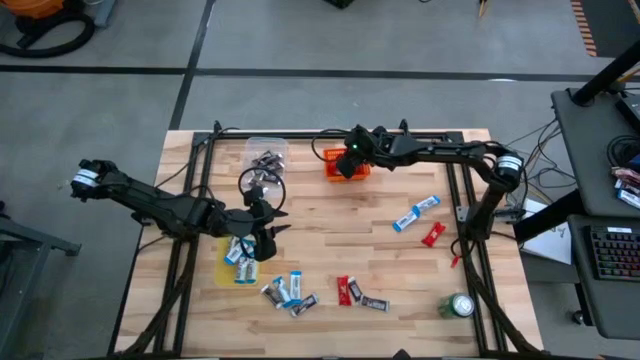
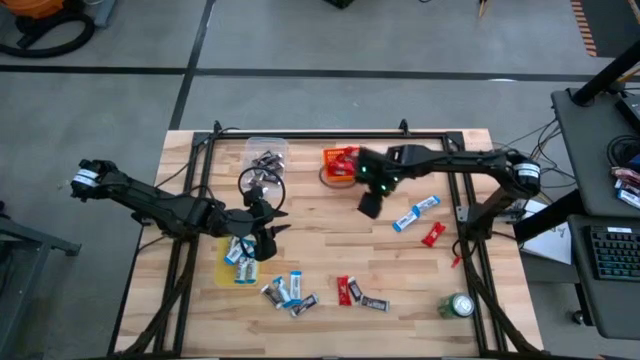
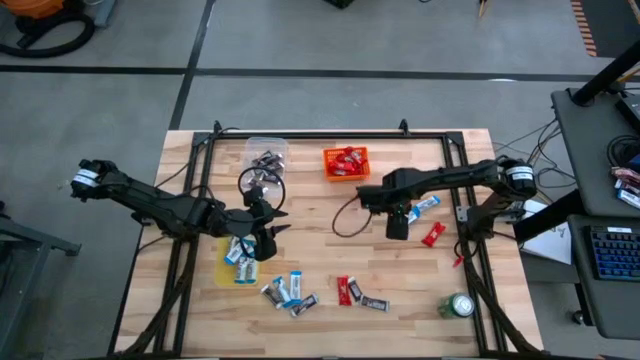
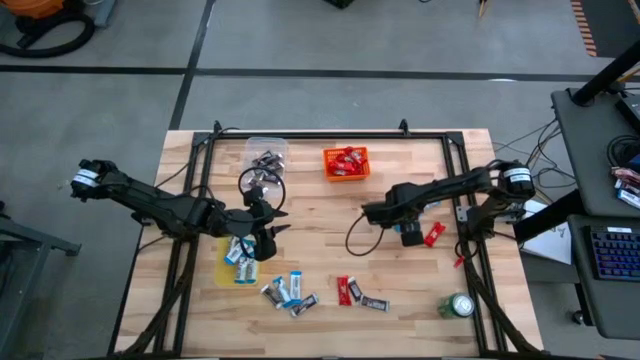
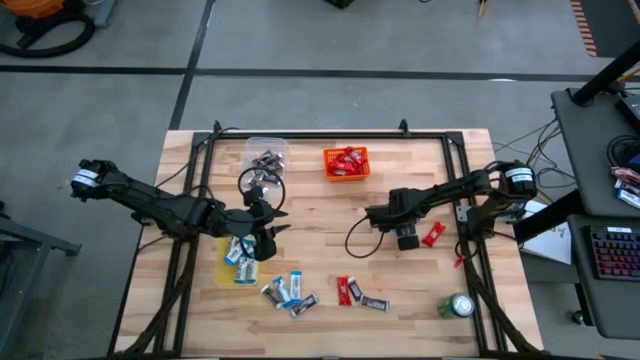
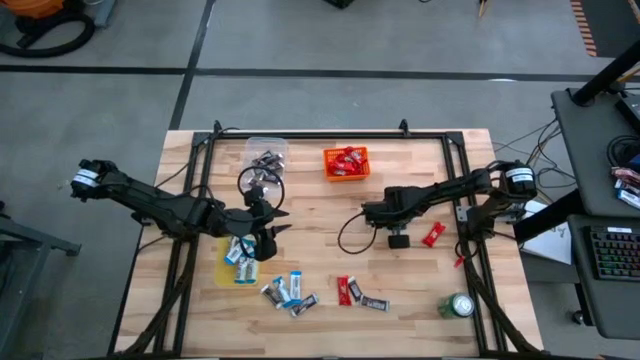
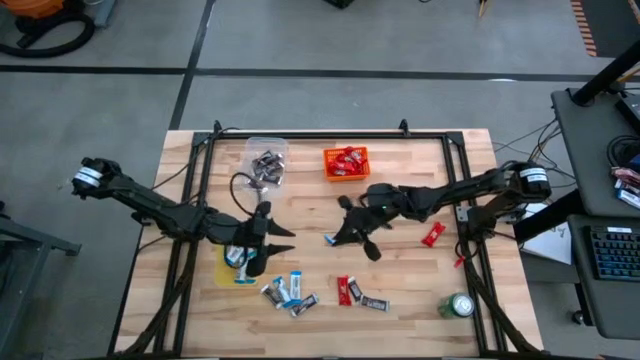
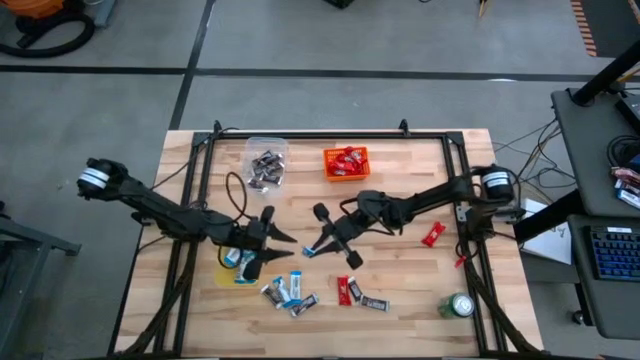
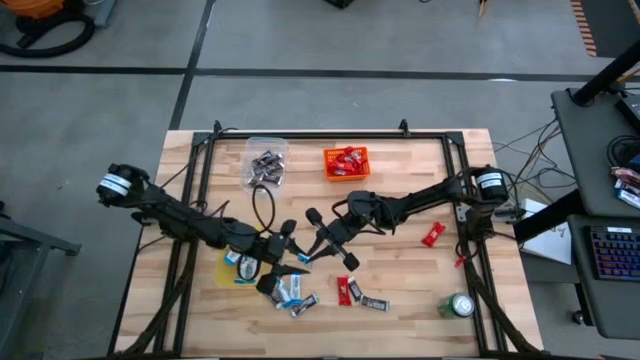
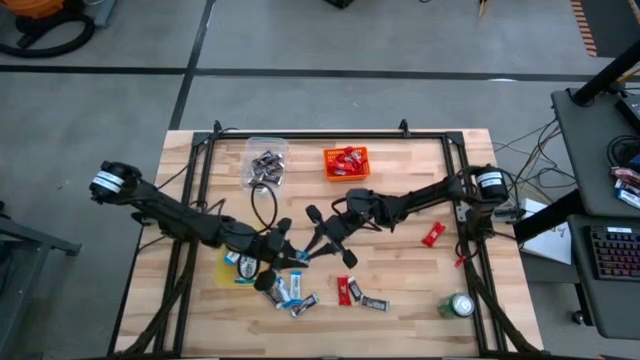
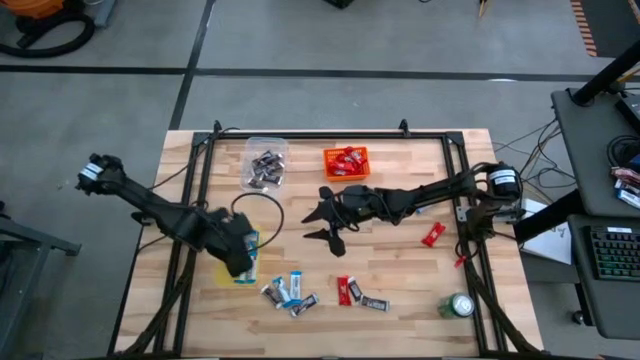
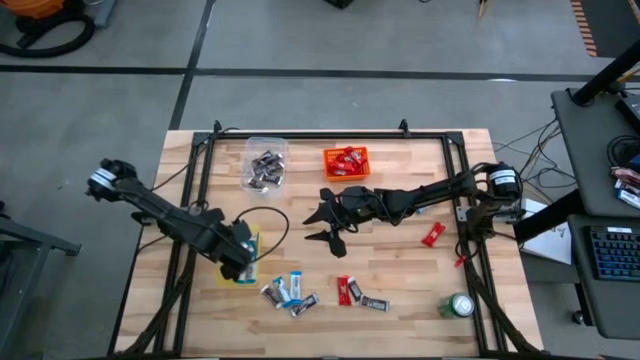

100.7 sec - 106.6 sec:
Task: Sort candy
Put the middle right white candy into the yellow bin

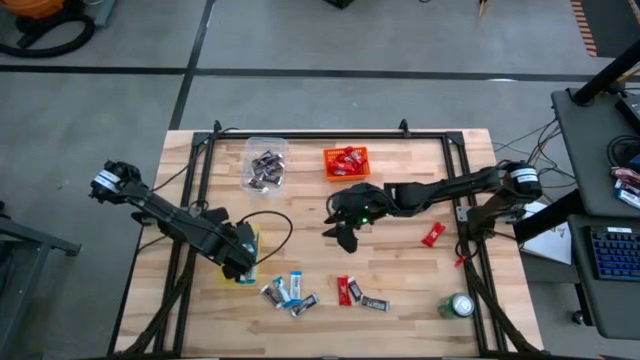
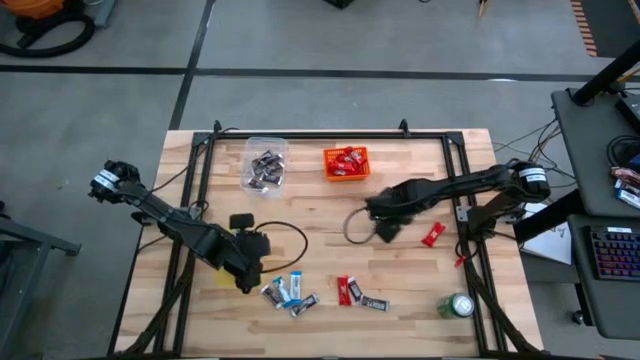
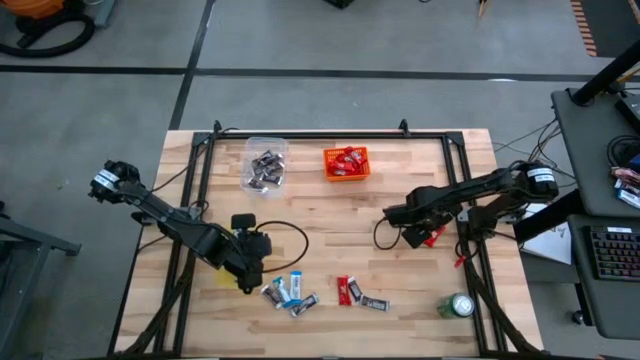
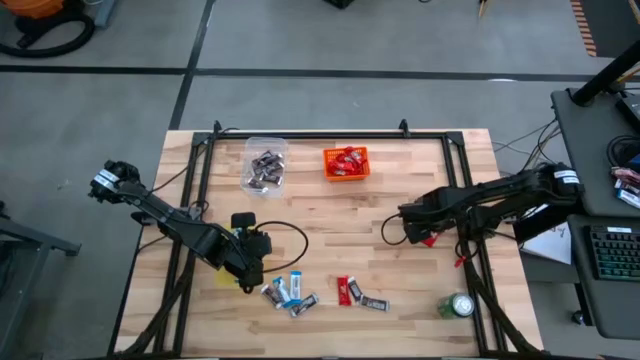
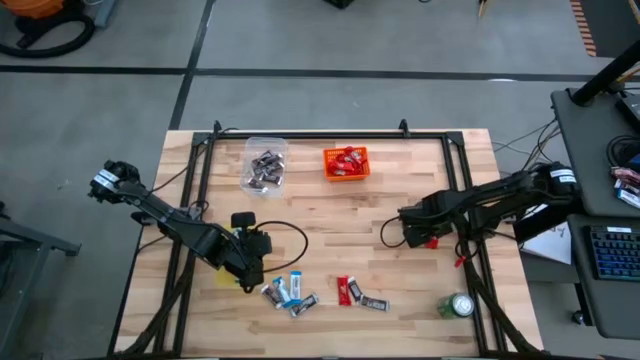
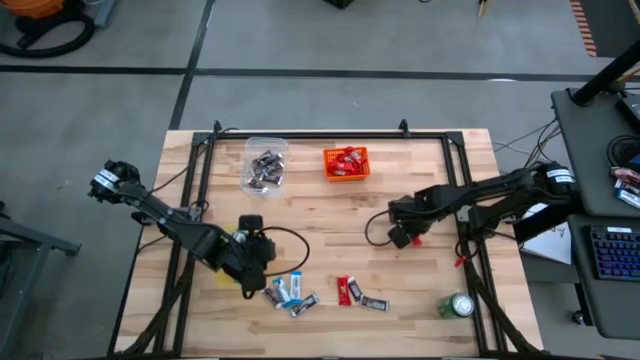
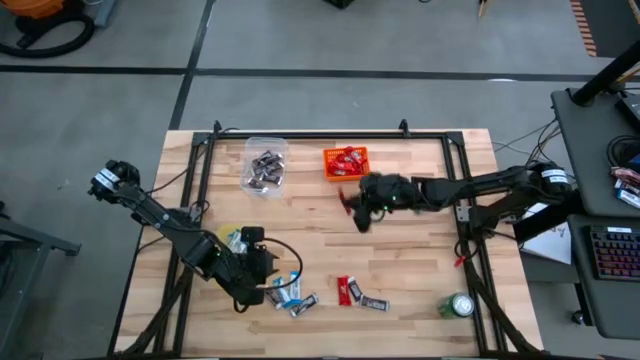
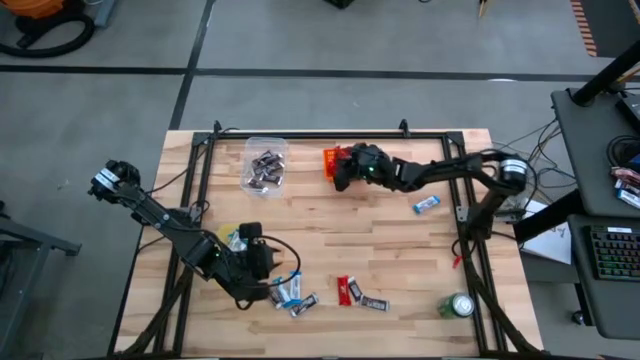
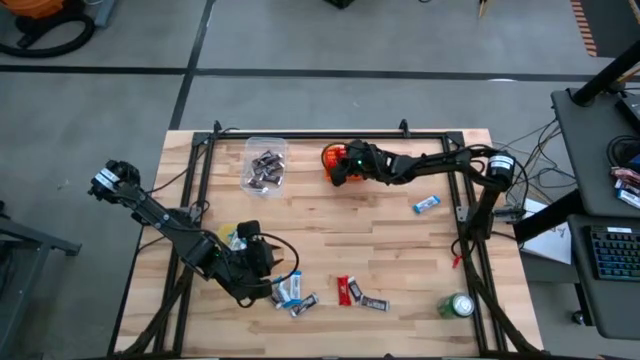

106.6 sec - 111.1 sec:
Put the right red candy into the orange bin

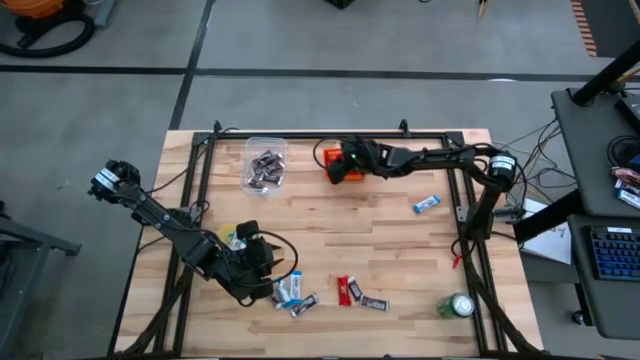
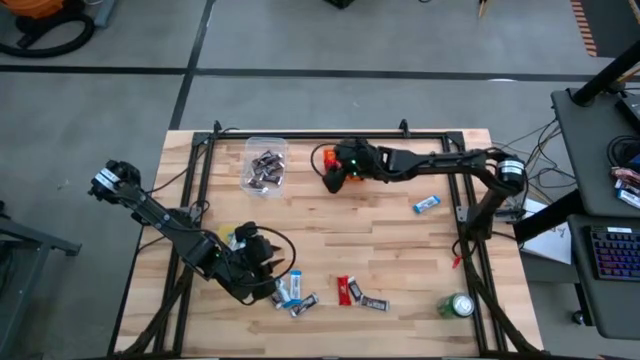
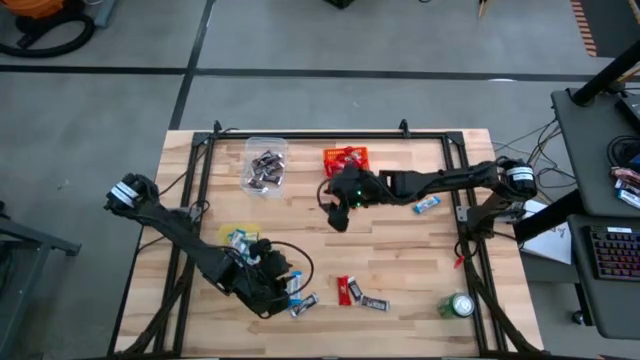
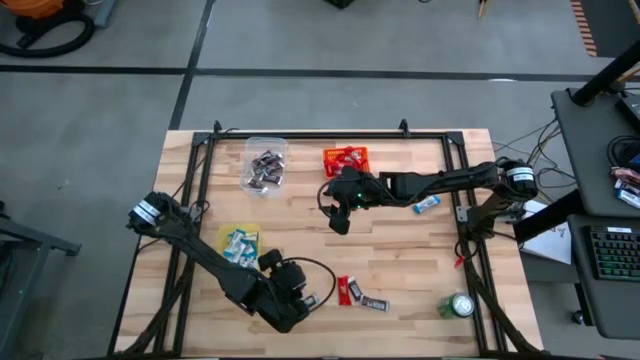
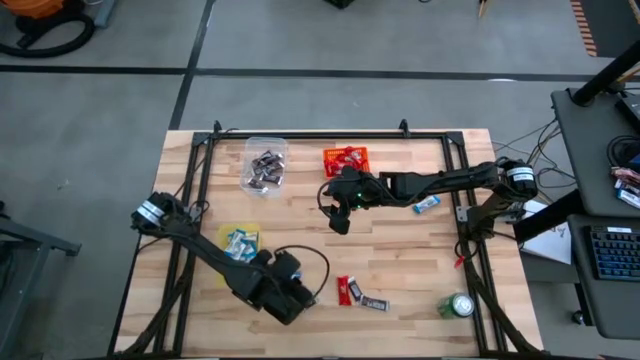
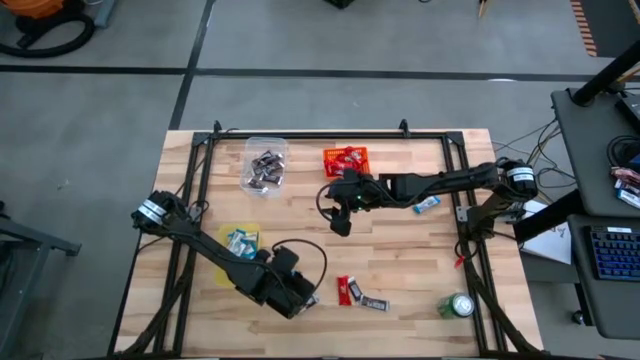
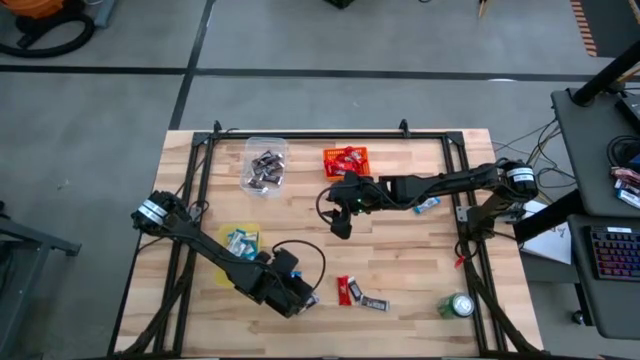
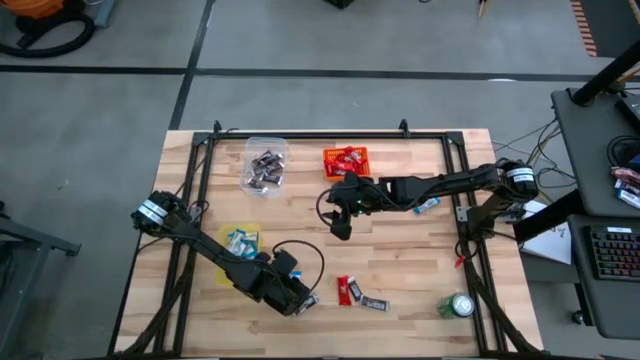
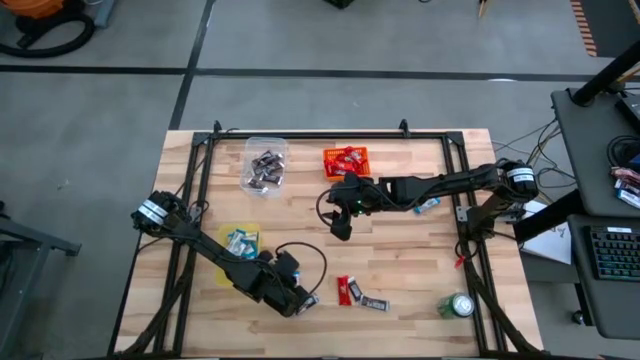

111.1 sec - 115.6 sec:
Put the bottom left white candy into the yellow bin

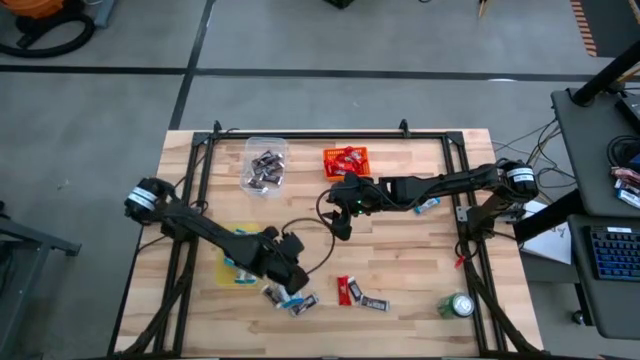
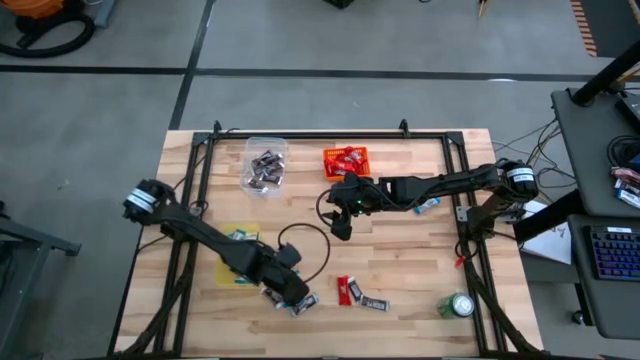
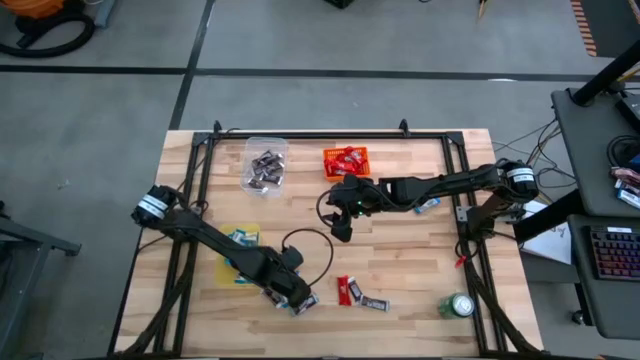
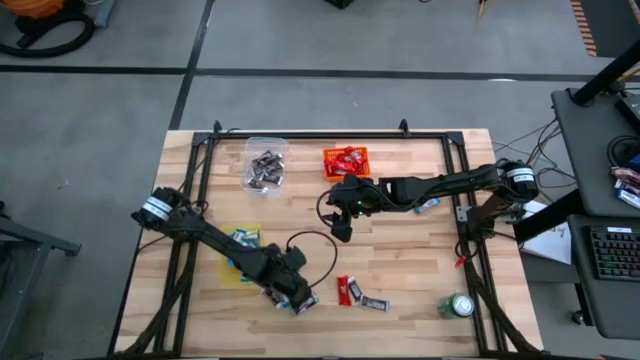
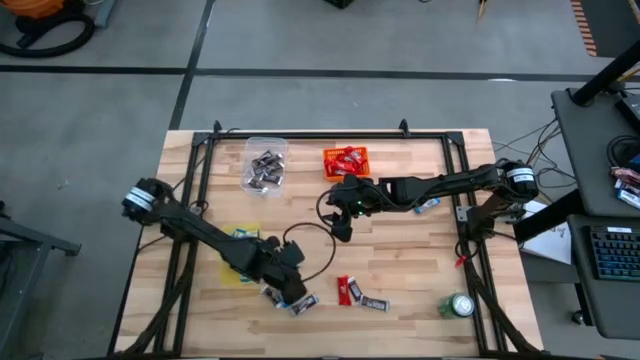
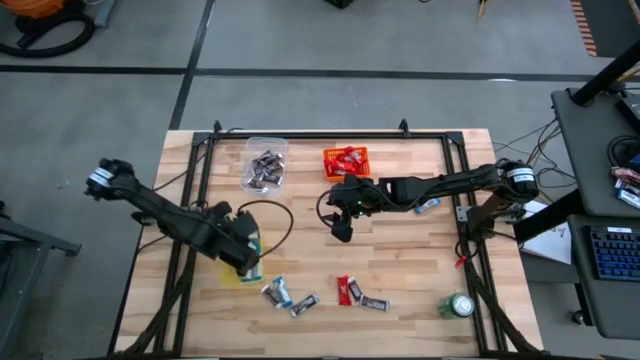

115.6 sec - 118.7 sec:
Put the bottom left white candy into the yellow bin

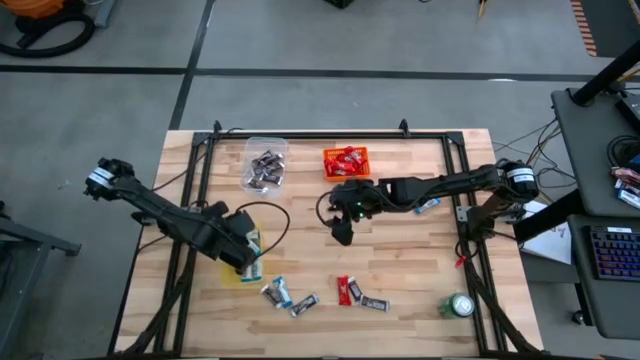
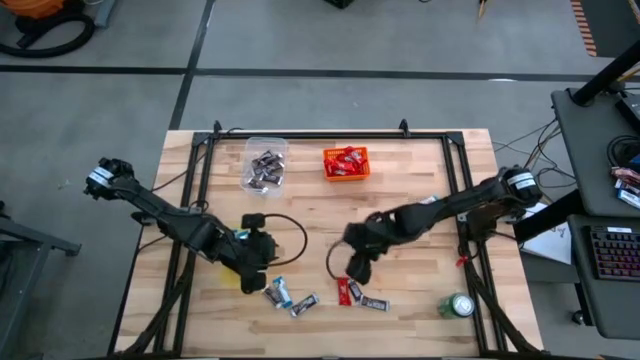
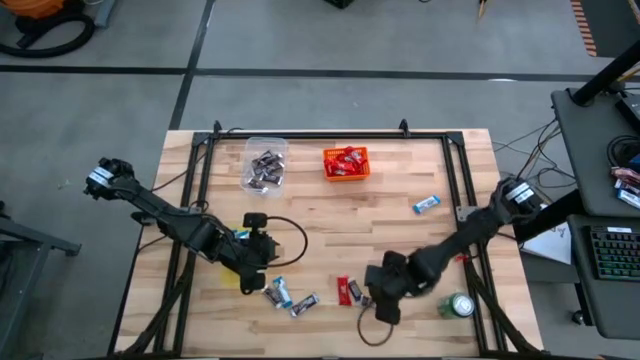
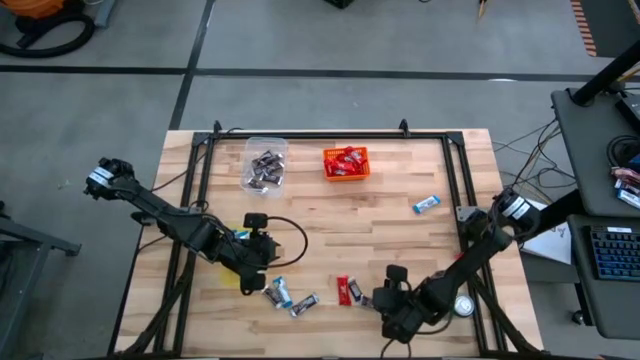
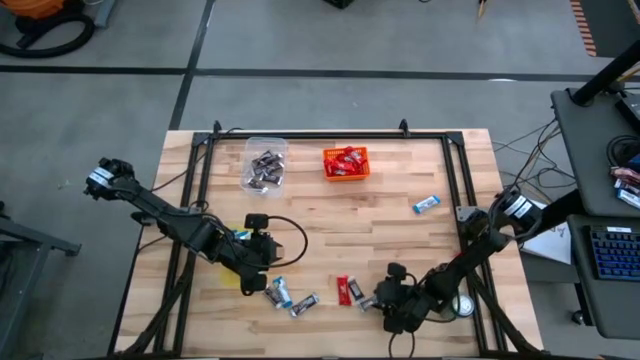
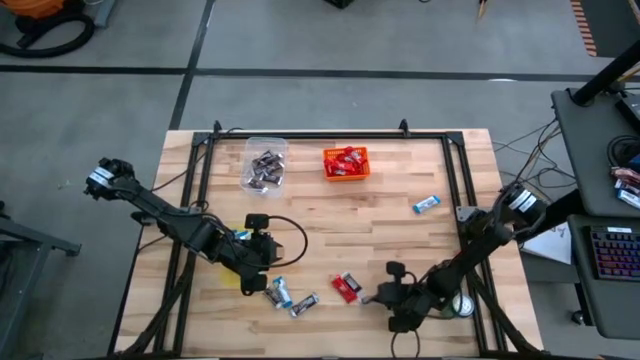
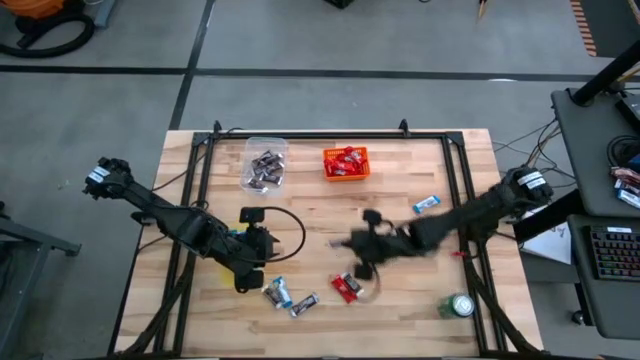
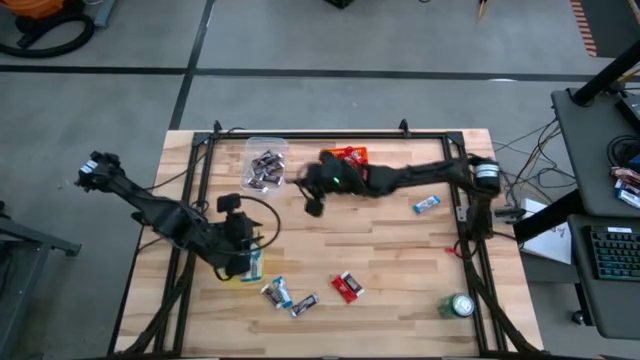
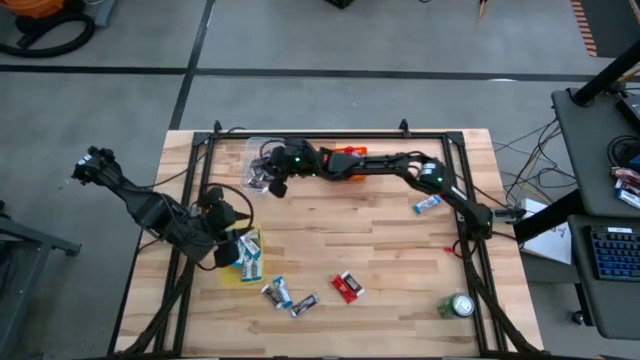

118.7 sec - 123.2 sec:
Put the bottom center brown candy into the transparent bin
